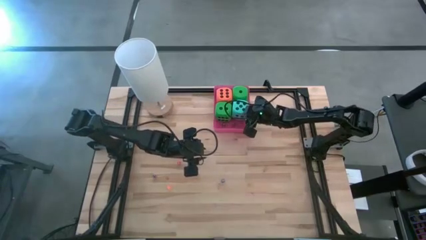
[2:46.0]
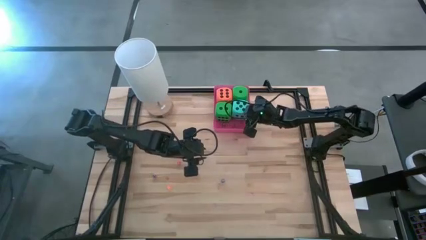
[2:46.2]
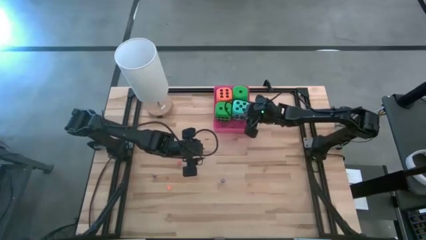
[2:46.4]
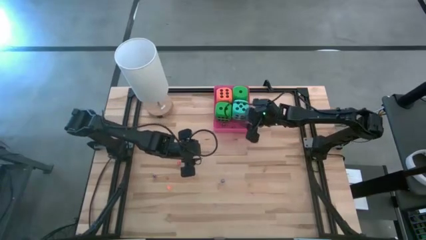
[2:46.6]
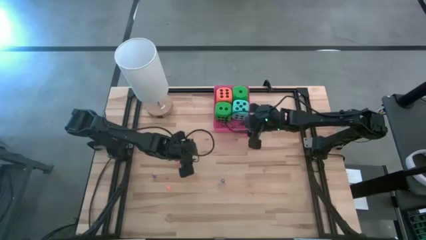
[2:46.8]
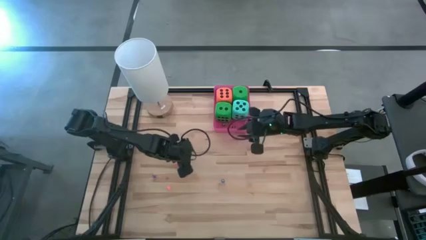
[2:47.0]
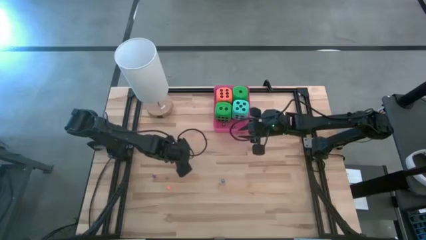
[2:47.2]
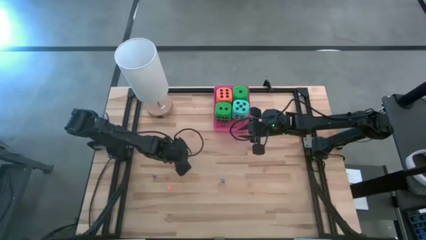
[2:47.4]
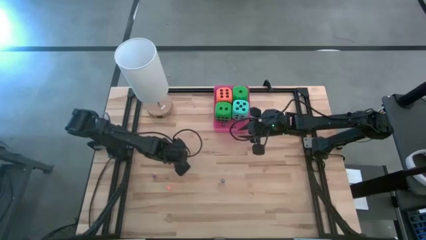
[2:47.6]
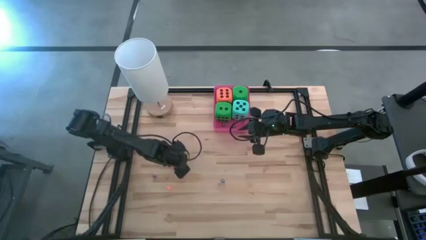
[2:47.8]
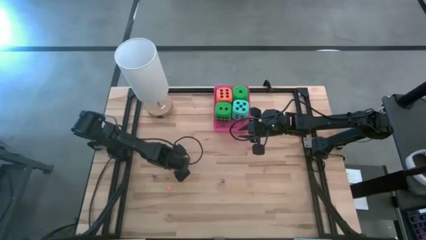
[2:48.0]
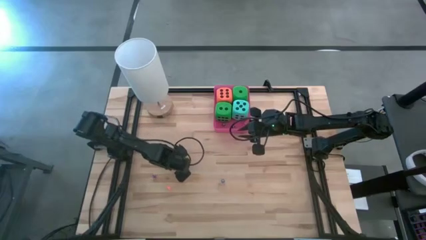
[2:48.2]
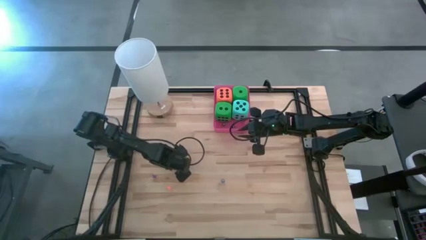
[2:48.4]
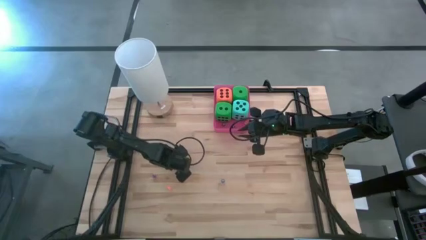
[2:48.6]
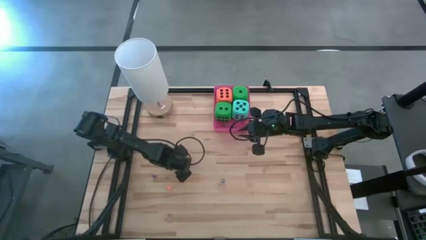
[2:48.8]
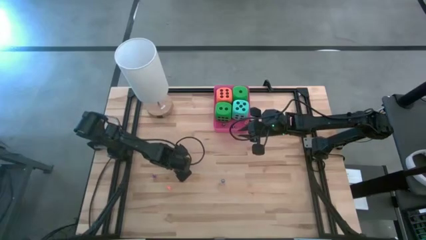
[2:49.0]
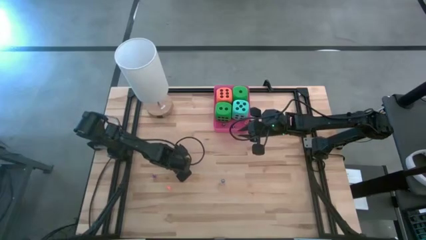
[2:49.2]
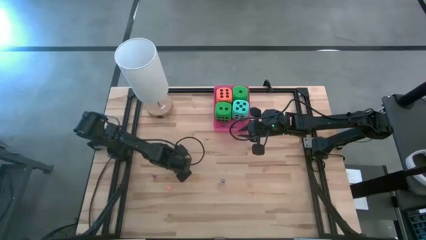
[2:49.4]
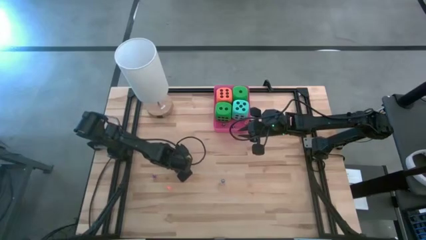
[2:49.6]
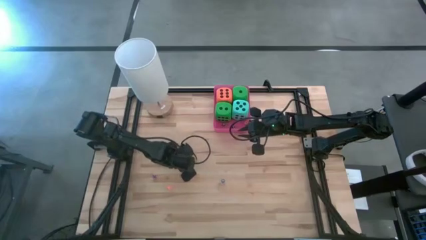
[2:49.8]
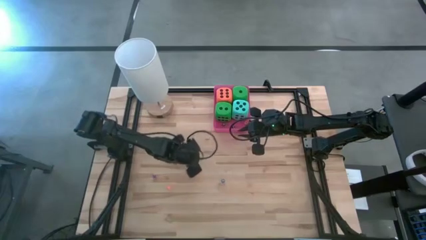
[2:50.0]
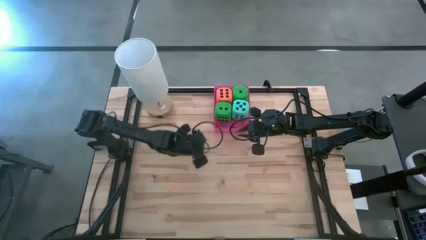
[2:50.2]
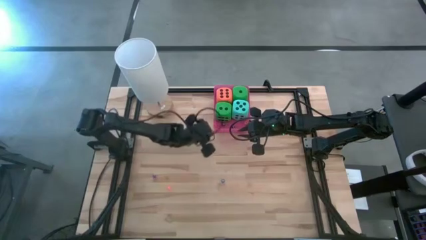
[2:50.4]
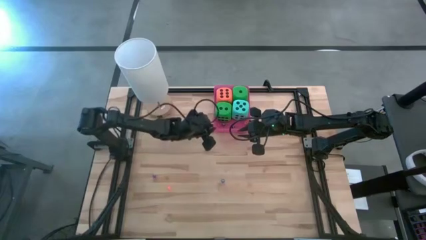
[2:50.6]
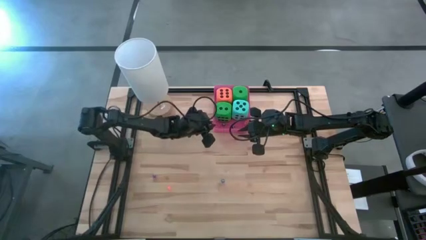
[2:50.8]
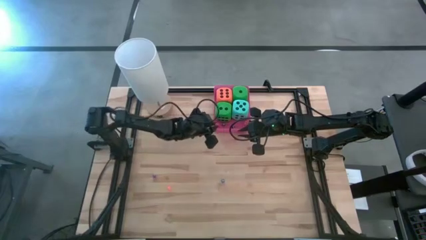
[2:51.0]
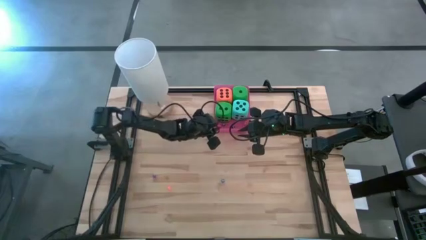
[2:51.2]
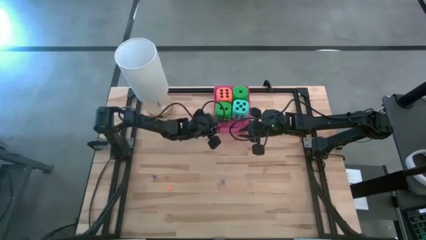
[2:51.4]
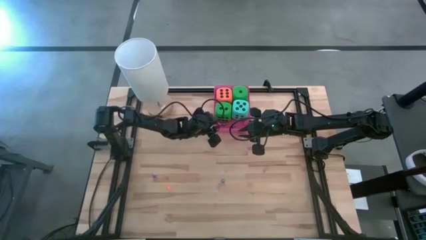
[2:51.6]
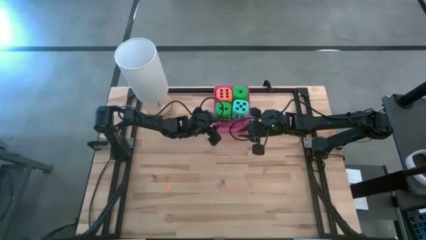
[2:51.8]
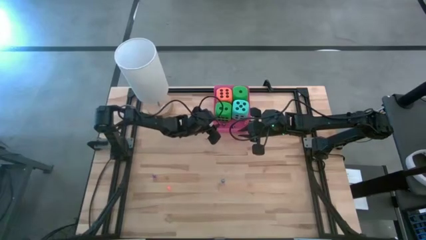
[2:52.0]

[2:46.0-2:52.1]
Task: Pick & Place Dice
Put the small red dice into the red container

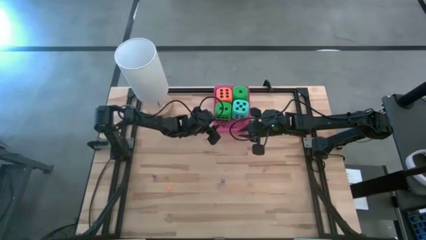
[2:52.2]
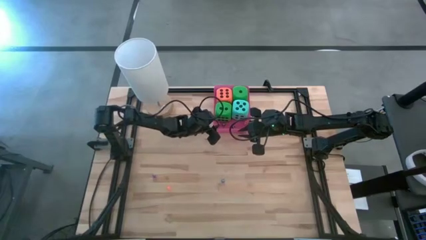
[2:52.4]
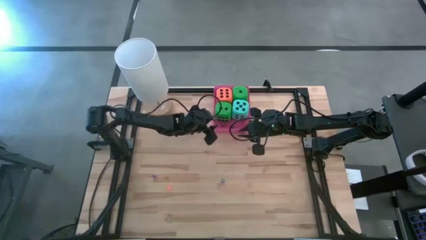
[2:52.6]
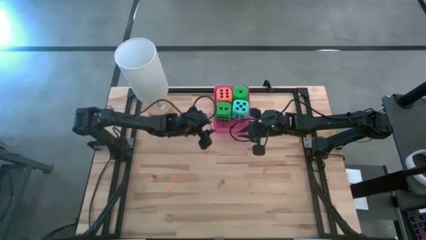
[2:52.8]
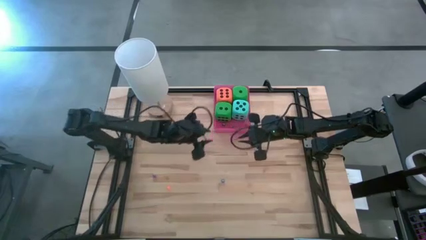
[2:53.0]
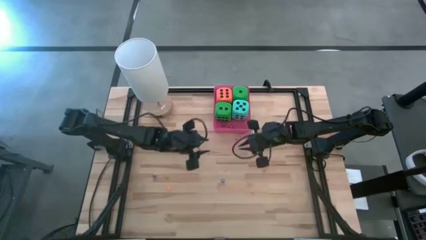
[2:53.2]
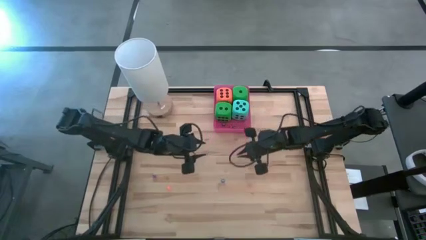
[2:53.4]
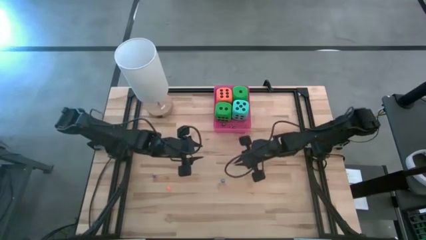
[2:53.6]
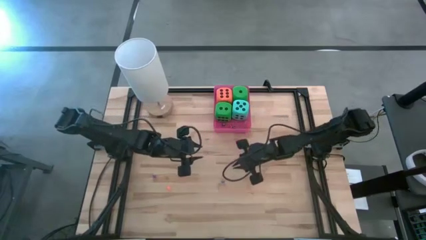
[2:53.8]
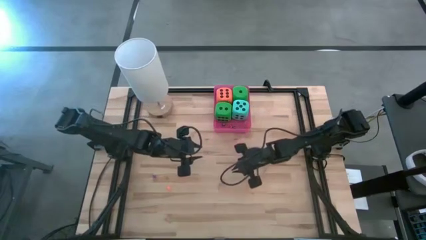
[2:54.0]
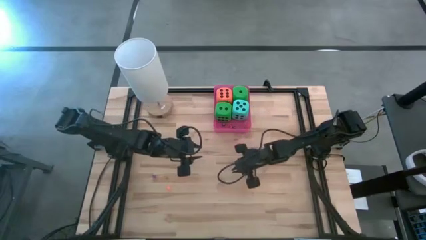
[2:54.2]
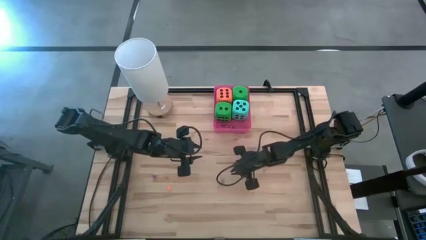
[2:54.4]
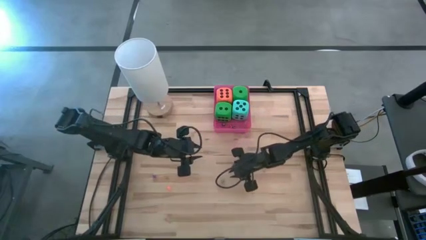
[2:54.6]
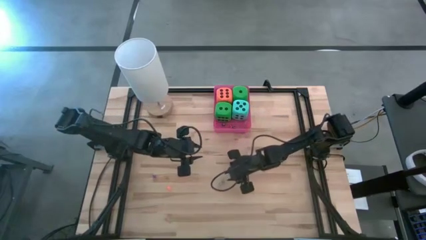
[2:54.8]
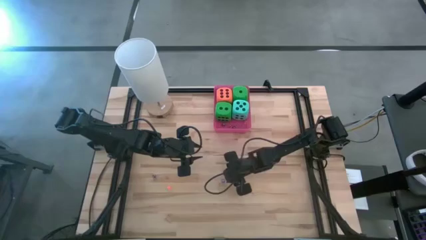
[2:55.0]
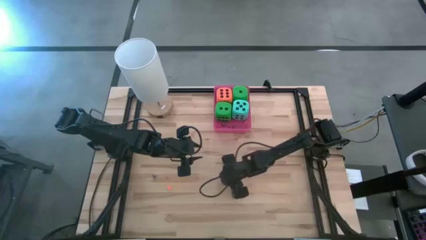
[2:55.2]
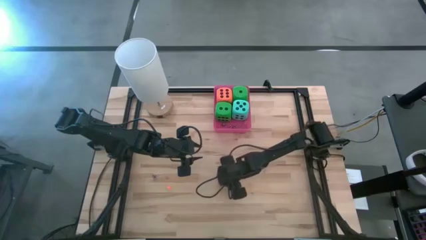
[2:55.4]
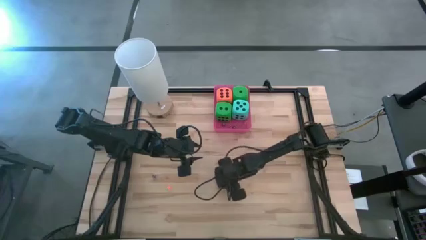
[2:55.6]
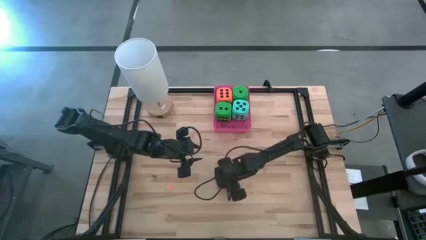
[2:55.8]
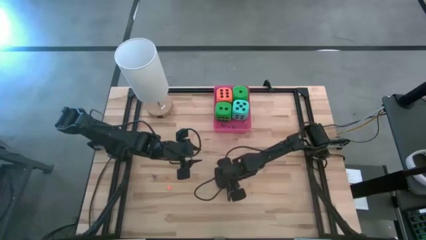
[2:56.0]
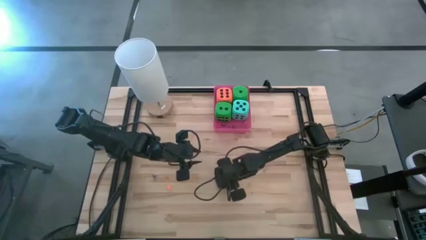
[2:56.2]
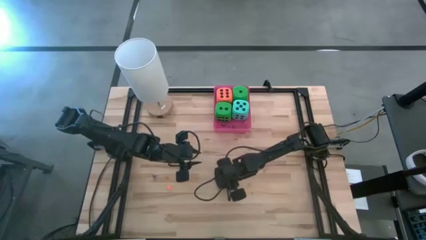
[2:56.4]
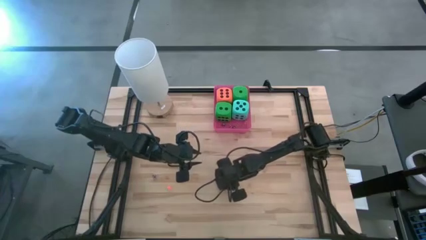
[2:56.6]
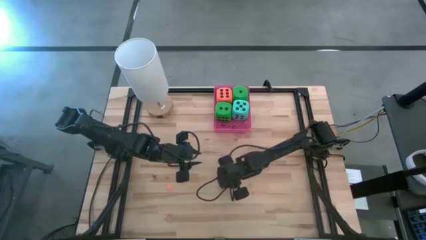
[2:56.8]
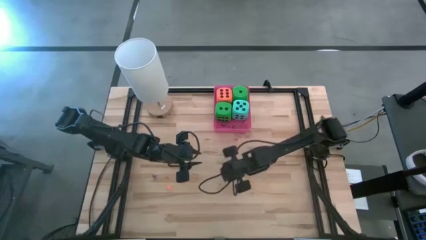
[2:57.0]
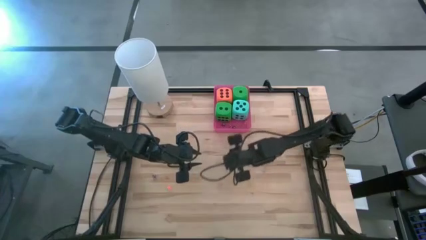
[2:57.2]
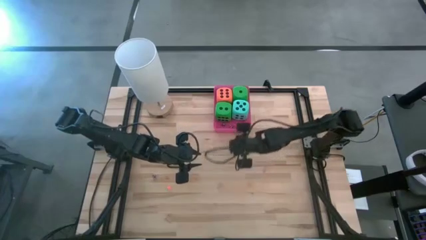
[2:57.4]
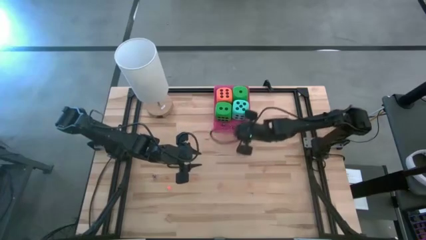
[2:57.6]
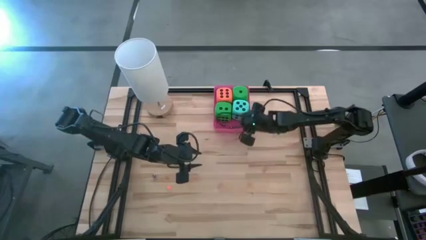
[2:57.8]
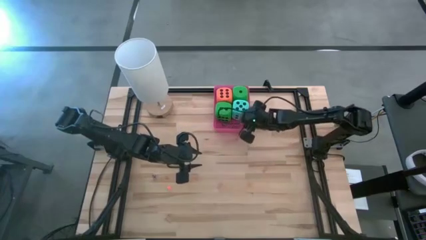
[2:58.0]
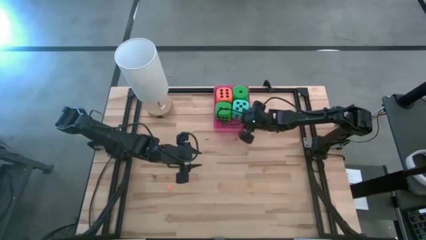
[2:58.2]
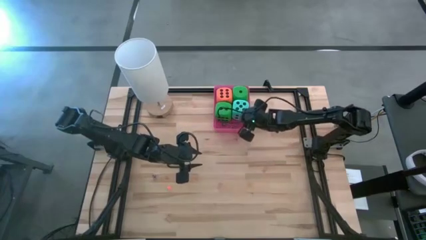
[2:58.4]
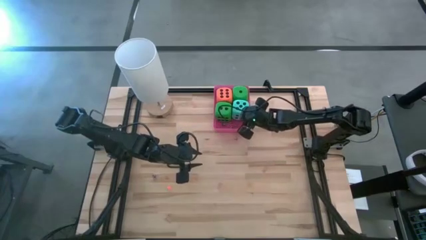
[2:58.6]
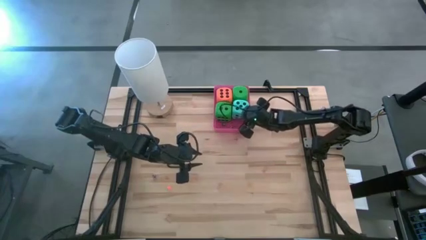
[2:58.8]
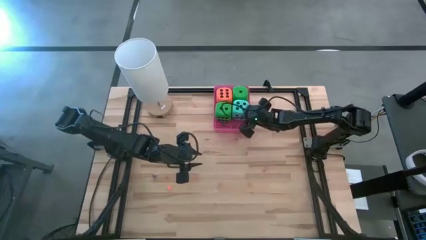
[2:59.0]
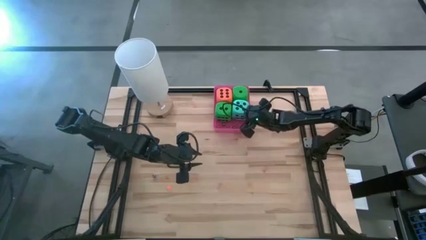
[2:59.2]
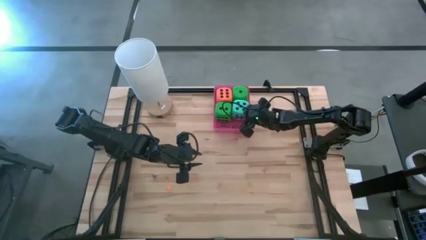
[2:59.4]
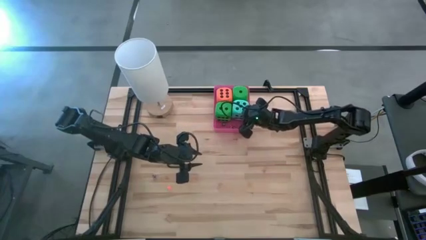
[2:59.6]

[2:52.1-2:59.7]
Put the small blue dice into the red container

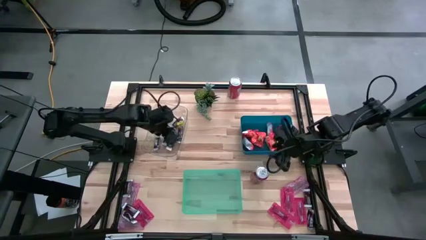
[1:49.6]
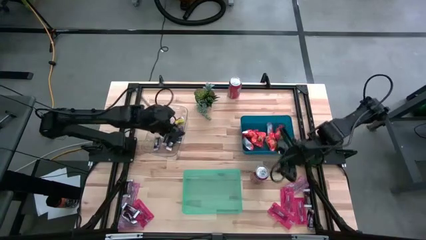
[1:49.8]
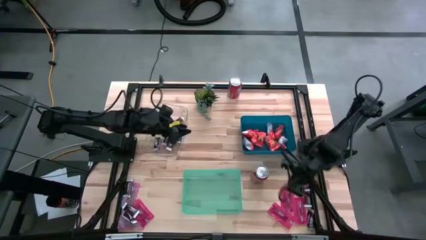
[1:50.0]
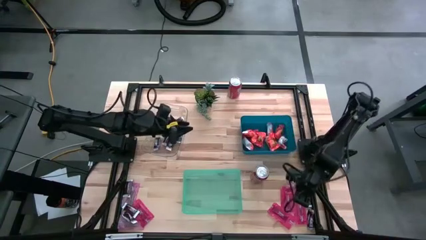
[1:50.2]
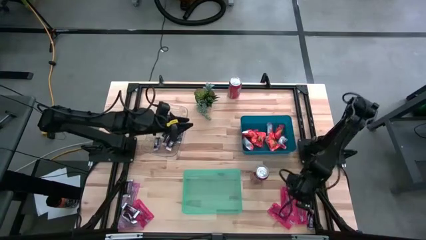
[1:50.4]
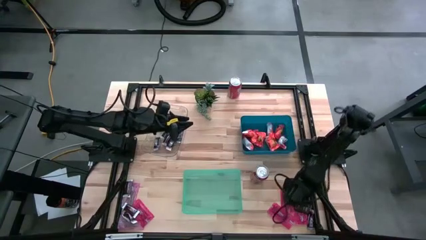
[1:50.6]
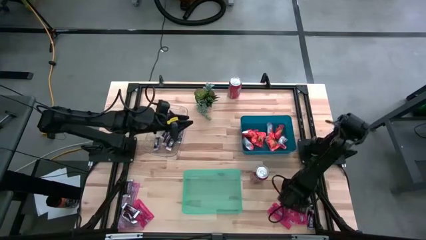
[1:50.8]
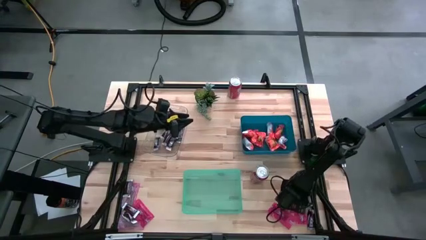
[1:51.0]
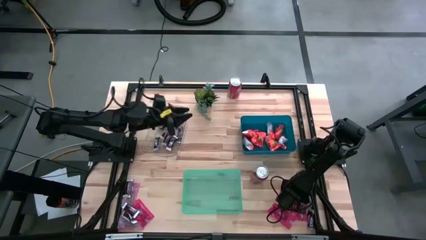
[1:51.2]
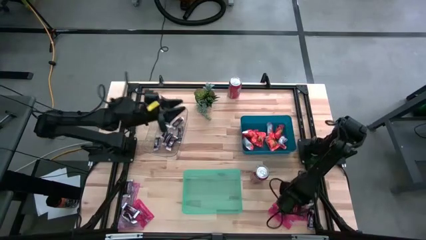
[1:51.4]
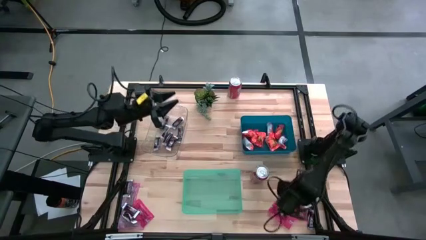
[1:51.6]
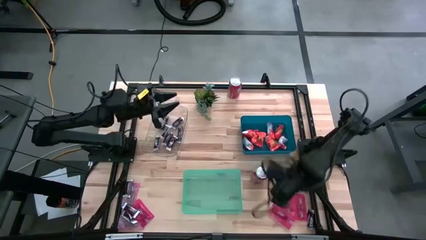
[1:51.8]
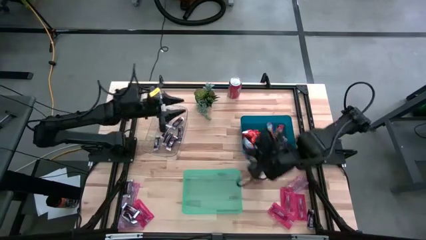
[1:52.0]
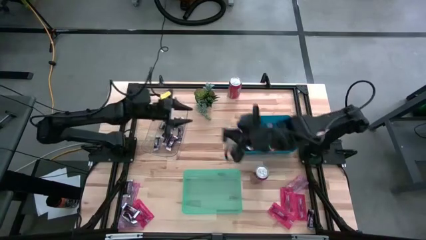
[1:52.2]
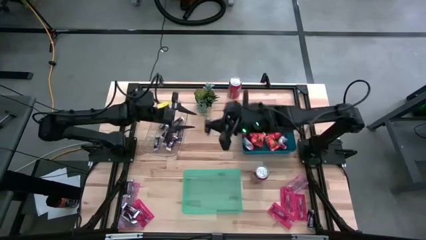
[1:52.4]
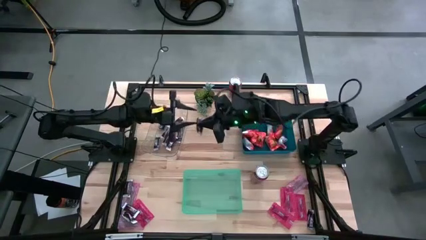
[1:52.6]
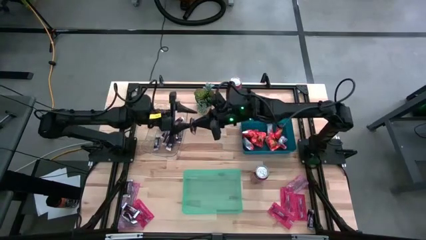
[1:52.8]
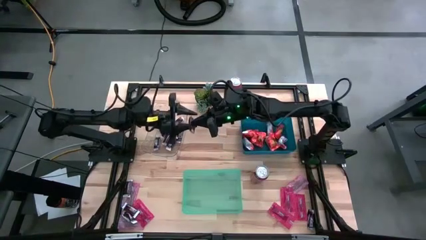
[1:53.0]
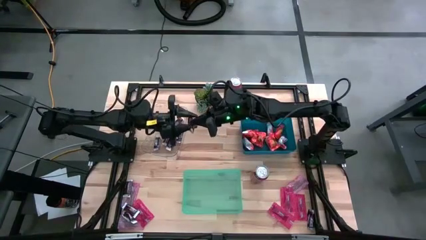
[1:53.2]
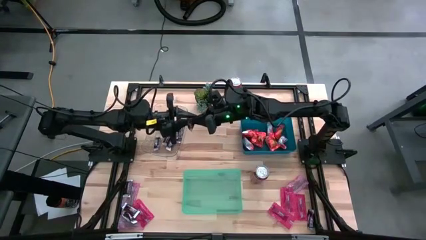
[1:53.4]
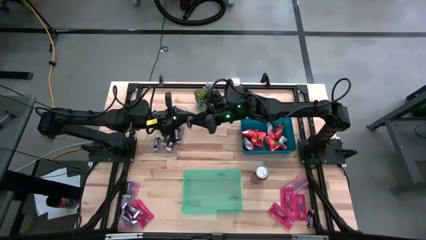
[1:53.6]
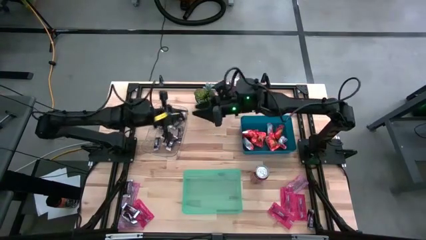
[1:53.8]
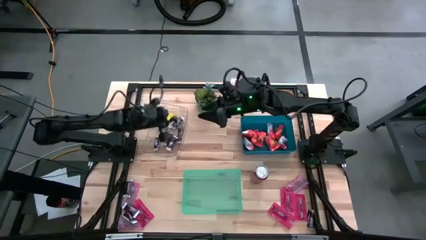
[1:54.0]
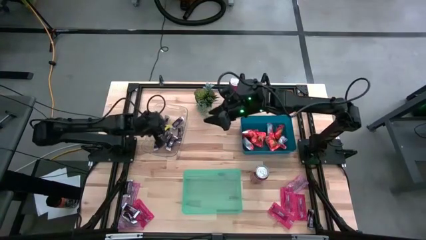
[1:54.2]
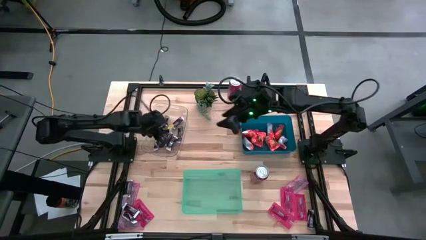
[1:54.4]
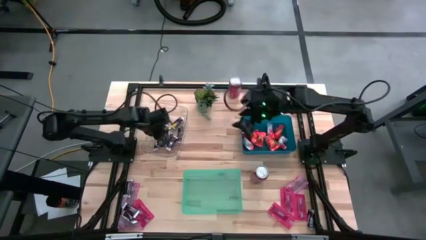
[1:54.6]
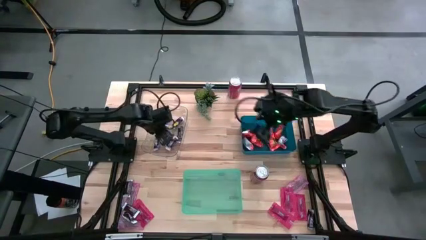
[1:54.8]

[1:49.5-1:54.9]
Task: Sort candy
Put the brown chocolate bar into the transparent bin
